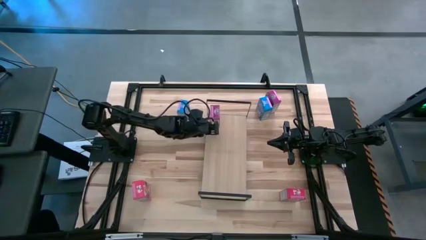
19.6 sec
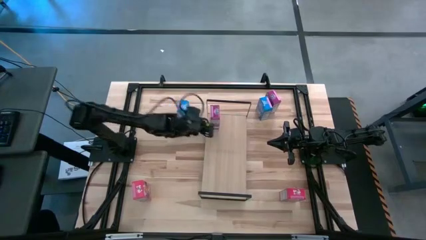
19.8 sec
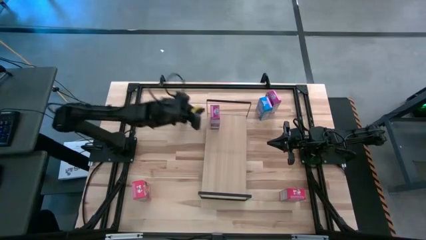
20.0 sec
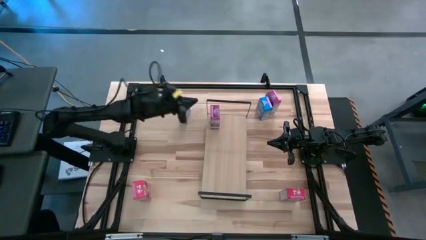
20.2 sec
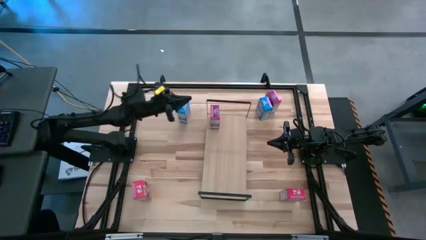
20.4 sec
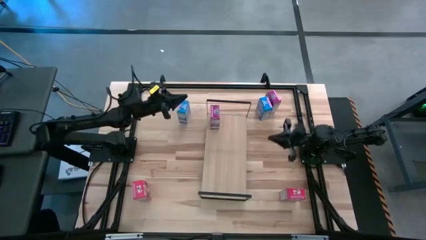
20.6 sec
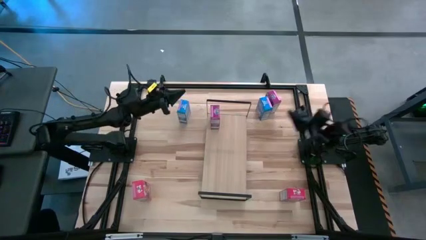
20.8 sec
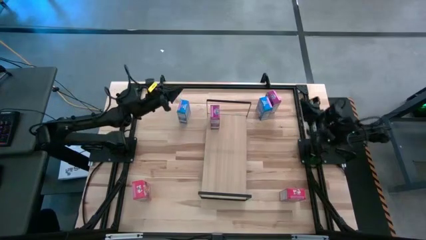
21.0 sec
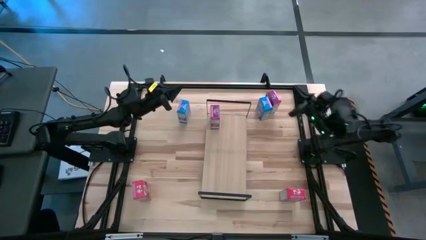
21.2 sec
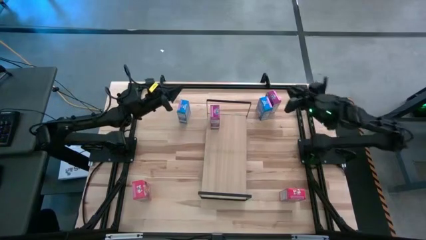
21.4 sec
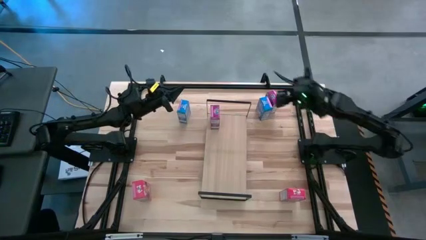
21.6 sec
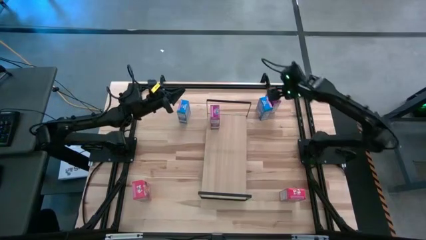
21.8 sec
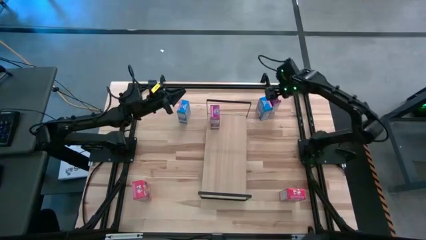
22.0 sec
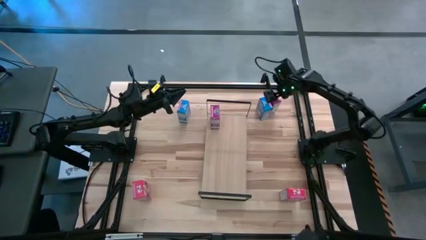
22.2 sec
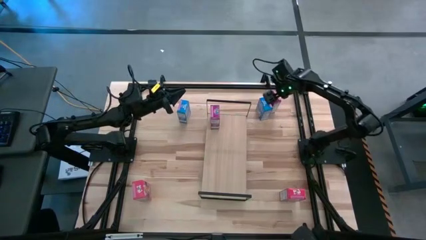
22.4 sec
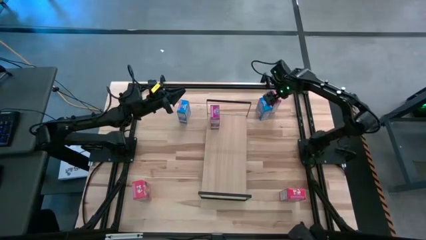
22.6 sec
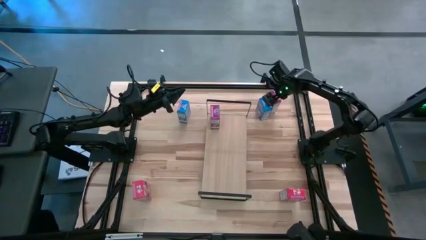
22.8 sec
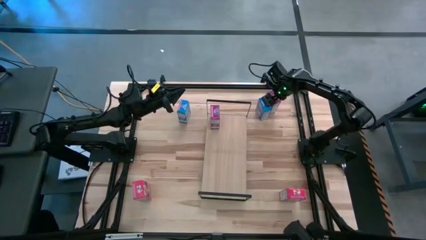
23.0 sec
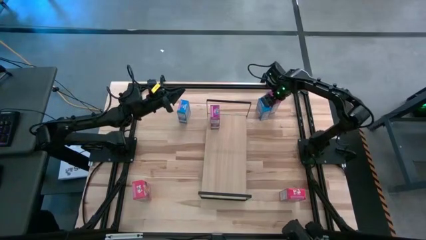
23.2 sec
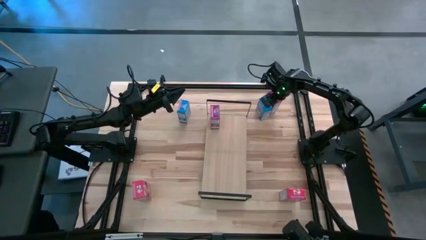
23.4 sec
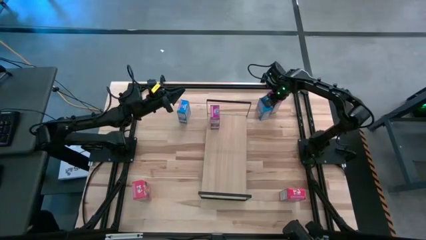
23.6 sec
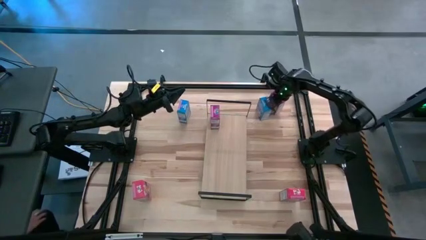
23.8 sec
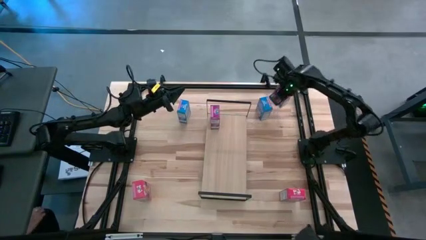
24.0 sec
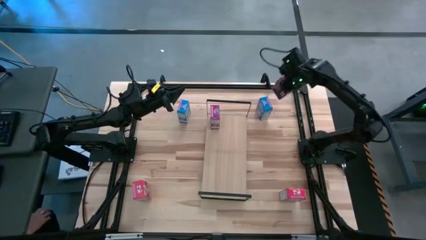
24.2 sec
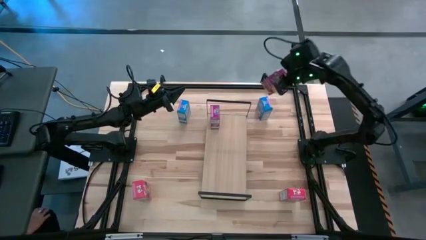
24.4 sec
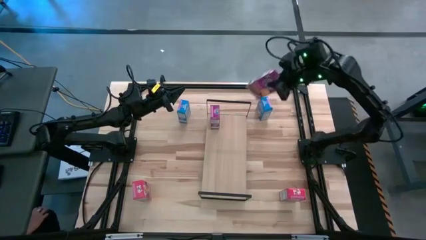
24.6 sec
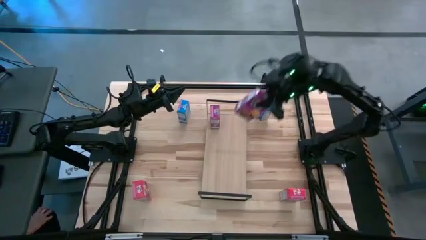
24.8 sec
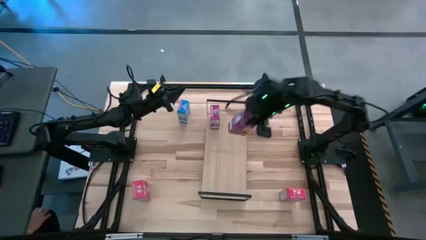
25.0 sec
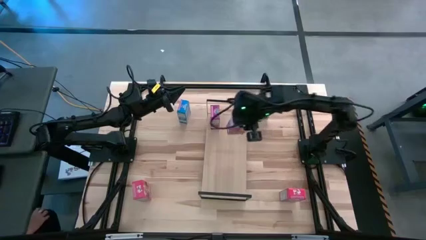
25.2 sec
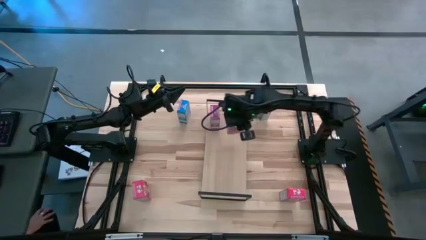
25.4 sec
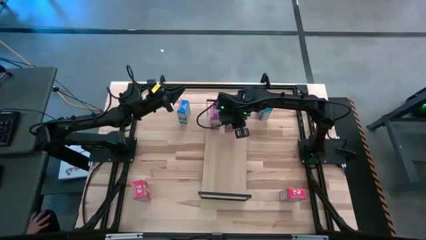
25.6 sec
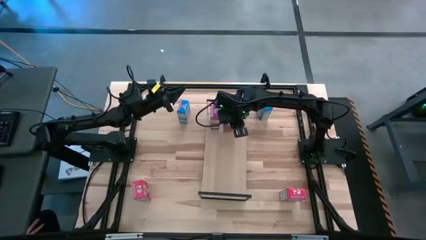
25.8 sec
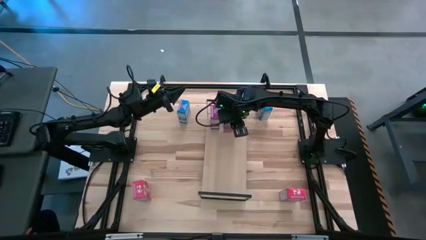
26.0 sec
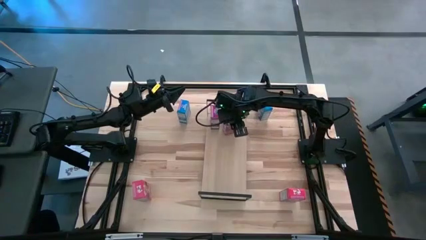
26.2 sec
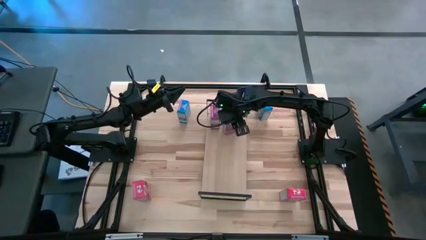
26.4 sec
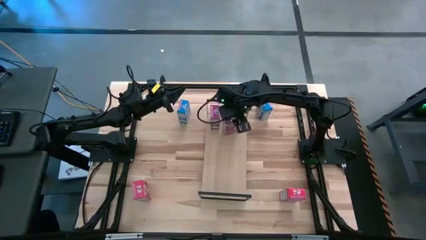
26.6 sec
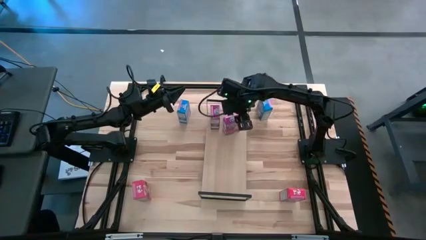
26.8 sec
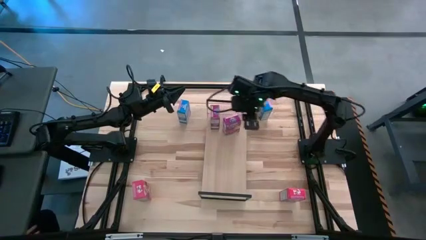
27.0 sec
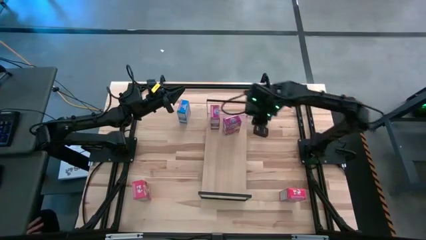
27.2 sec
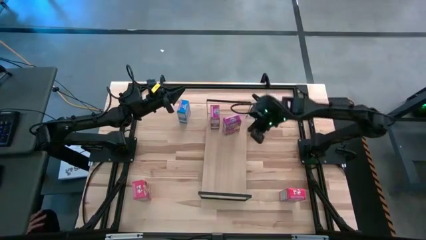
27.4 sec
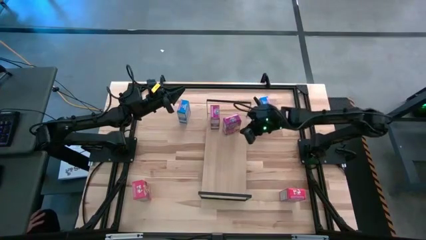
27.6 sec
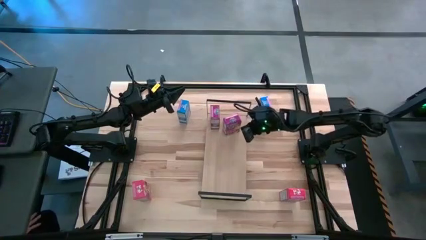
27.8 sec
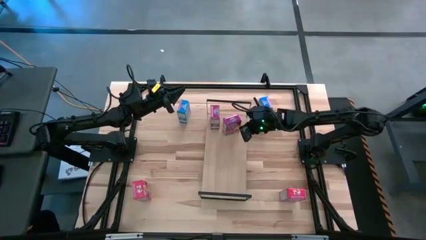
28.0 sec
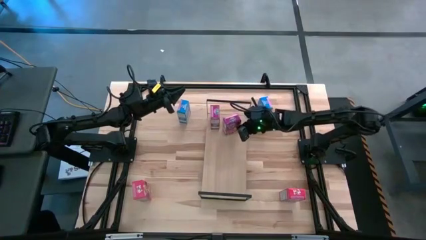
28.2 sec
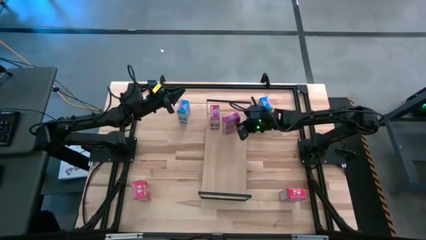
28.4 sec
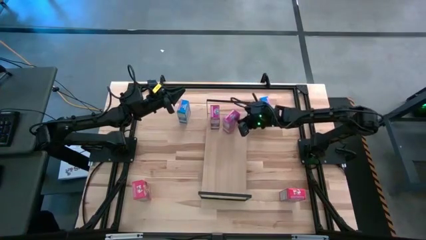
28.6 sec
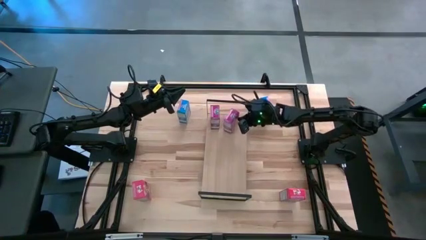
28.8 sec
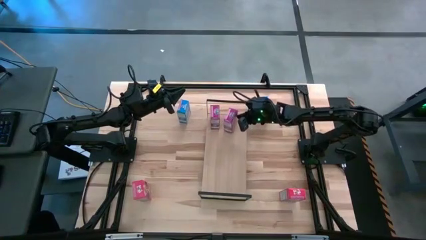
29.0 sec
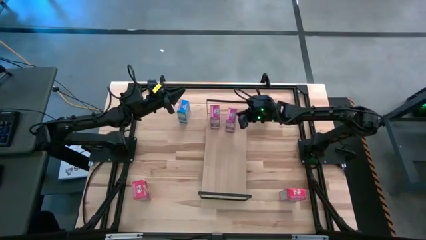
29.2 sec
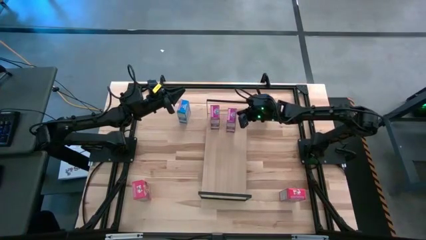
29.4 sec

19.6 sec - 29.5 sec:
Task: Stack cereal on shelf
Put the violet cereal box on the shelf aligned with the other violet cereal box

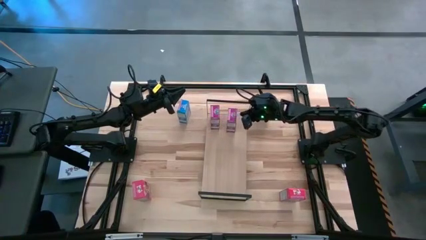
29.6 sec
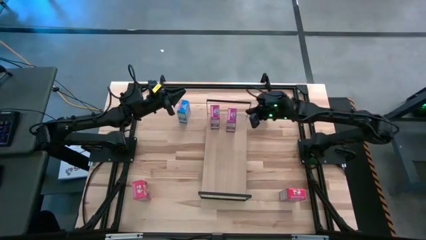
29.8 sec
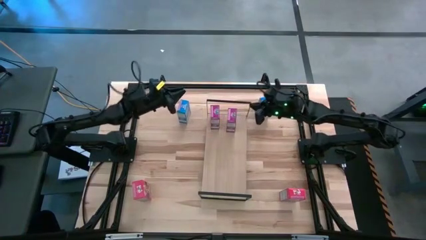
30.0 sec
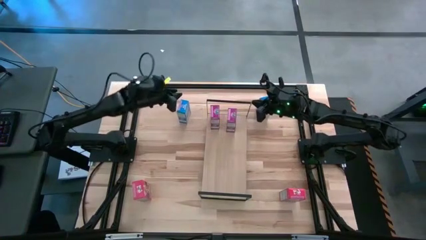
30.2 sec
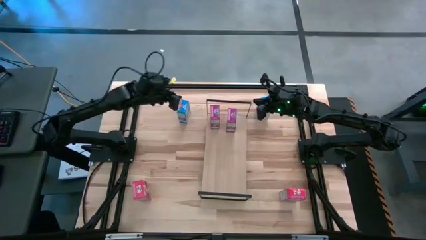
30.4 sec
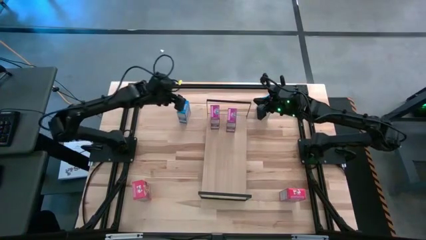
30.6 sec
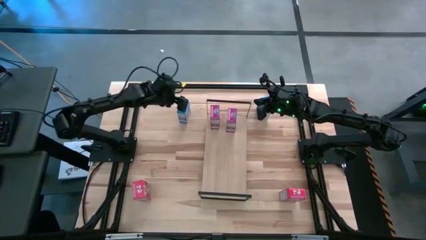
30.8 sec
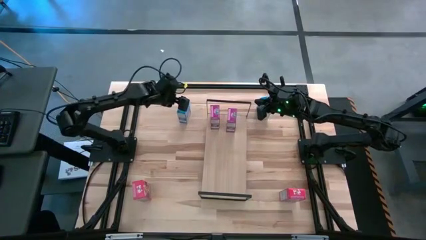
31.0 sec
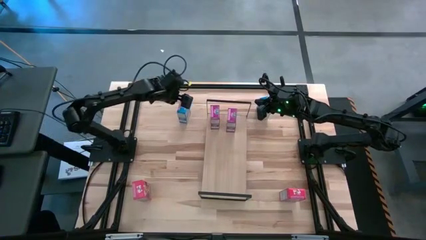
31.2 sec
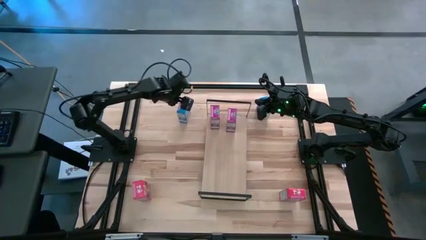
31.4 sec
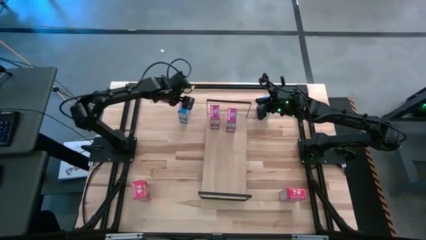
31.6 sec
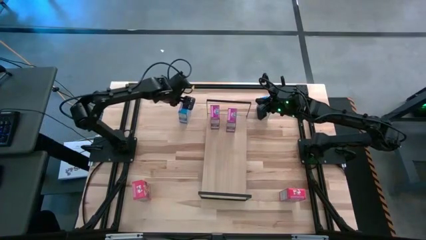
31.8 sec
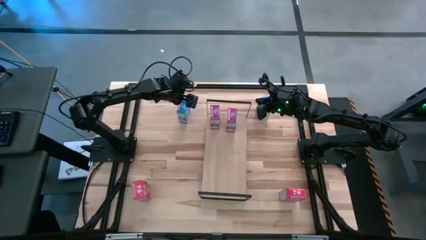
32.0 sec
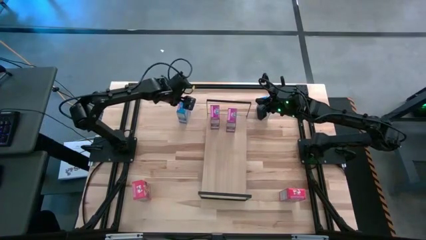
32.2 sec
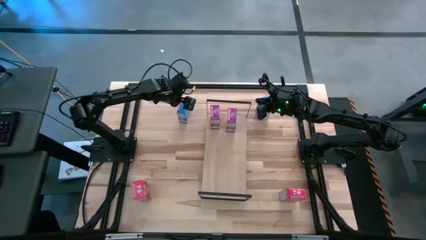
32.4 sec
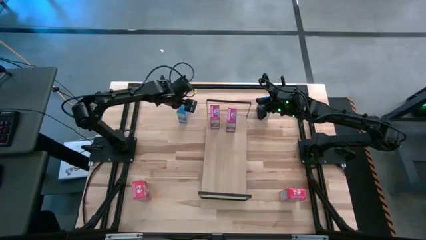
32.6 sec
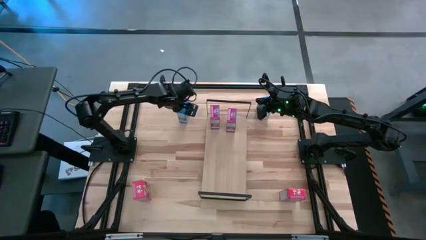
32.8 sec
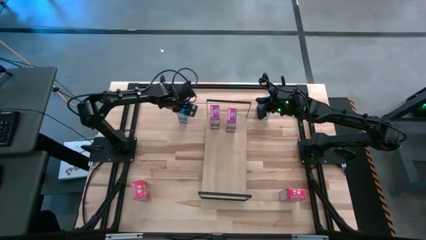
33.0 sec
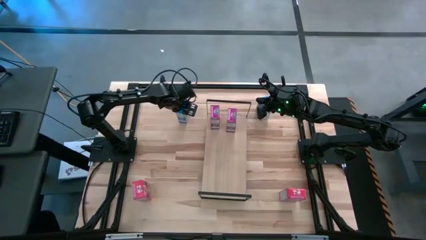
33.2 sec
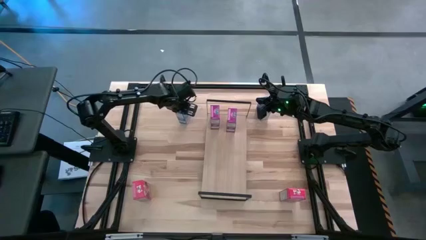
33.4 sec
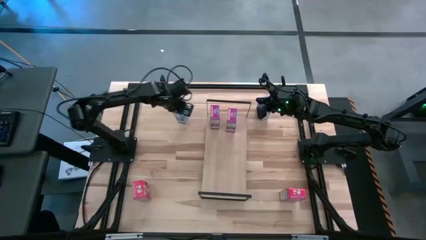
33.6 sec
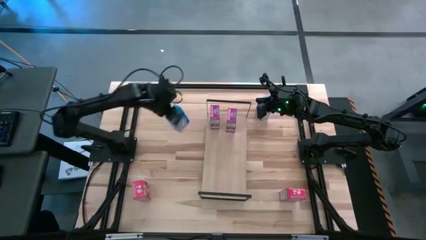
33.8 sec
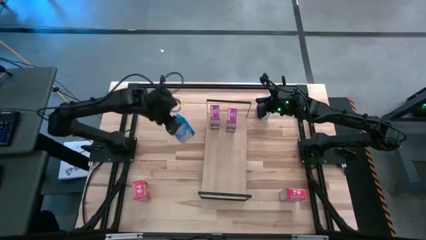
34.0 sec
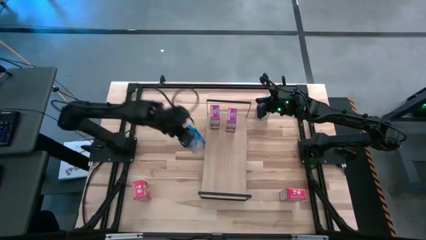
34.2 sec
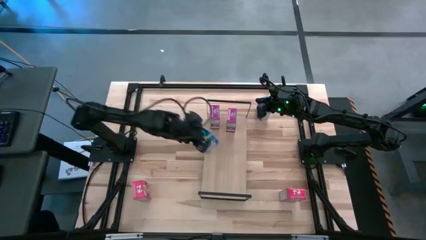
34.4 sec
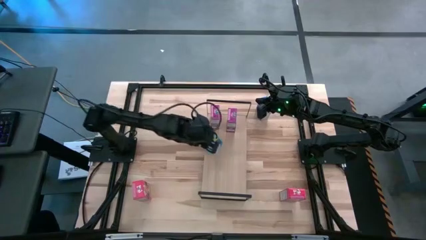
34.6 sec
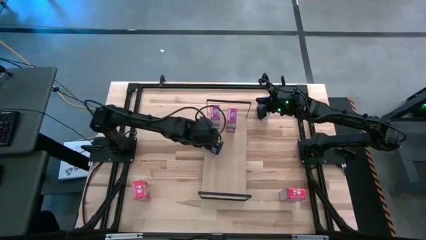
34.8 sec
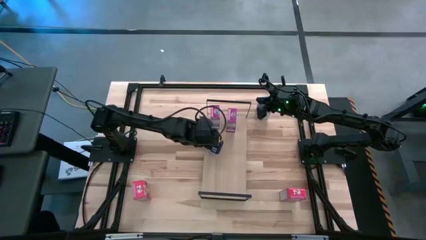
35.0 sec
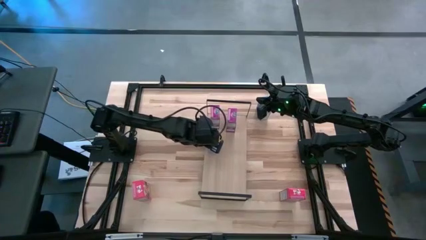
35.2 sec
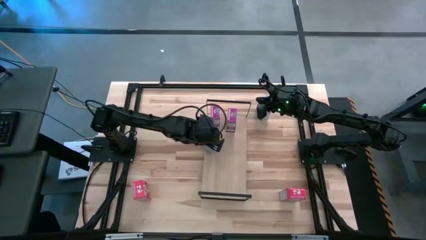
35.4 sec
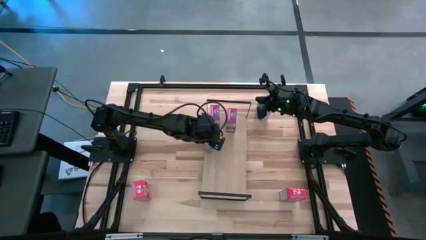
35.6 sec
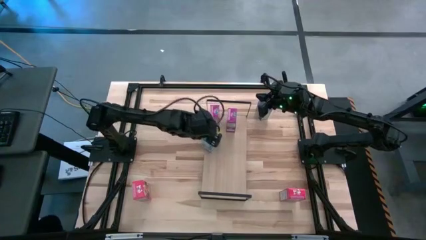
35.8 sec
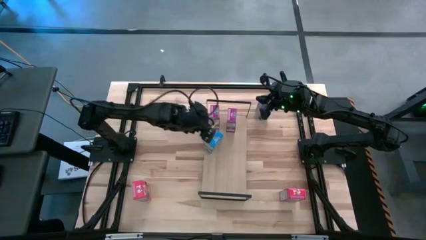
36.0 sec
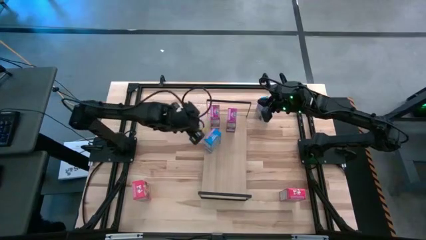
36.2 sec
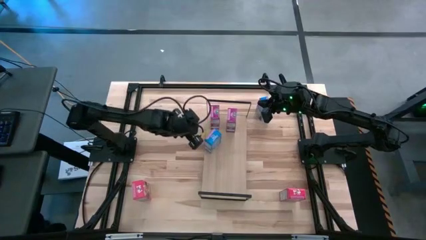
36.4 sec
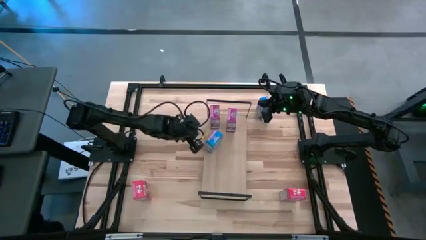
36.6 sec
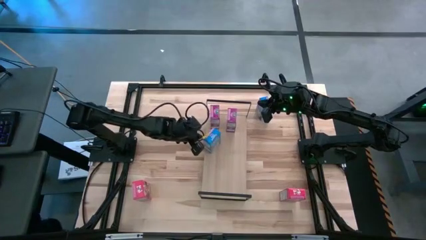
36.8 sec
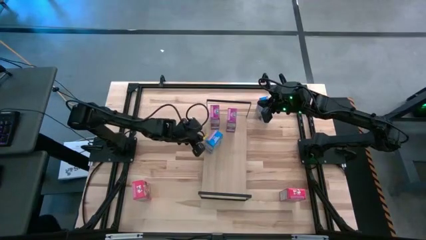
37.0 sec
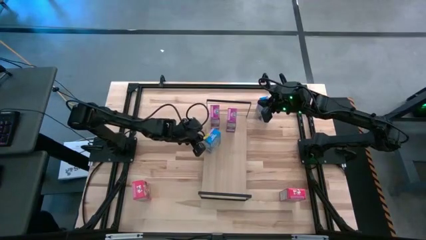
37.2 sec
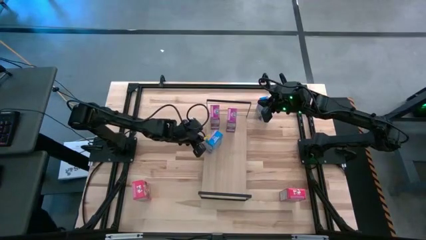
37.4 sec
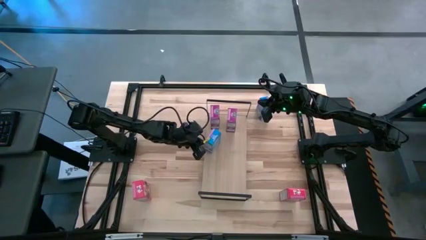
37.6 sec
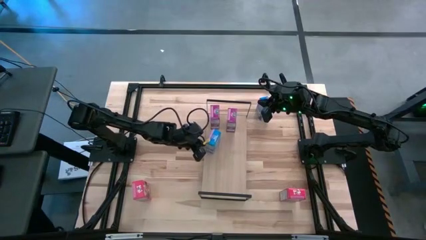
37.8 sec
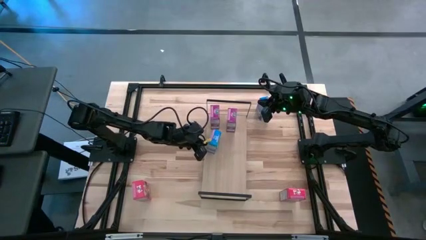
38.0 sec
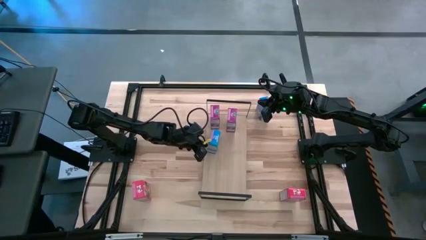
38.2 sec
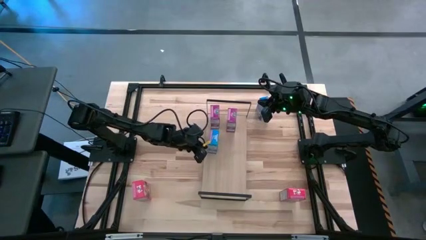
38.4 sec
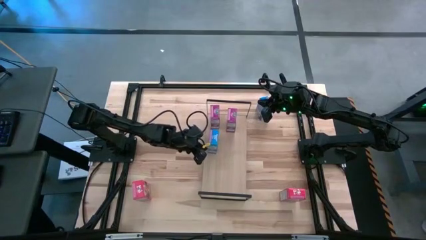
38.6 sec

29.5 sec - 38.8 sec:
Put the left blue cereal box on the shelf
